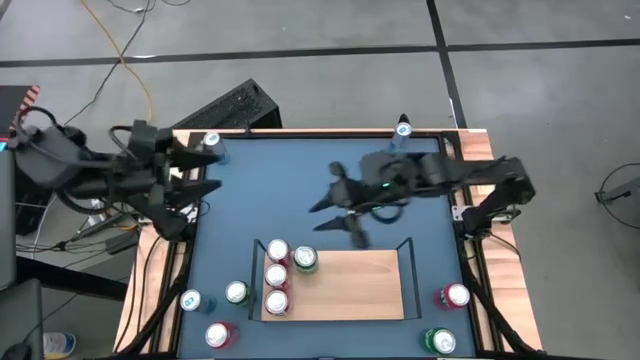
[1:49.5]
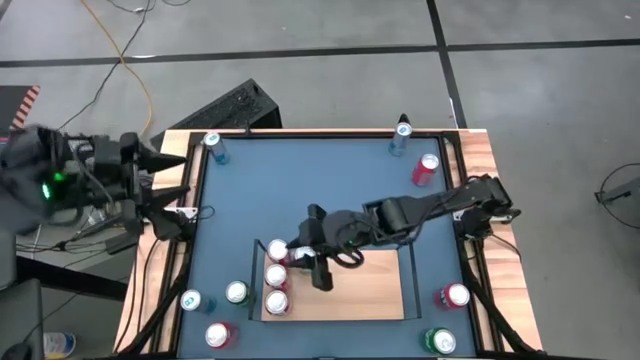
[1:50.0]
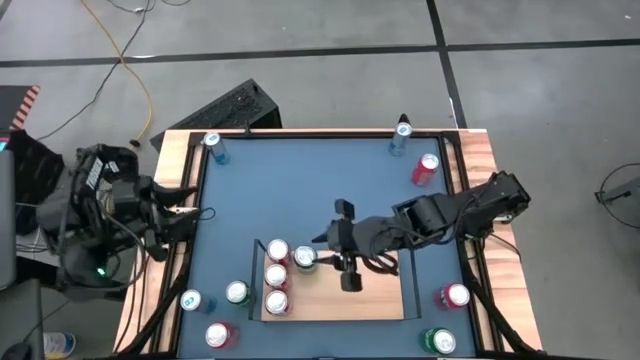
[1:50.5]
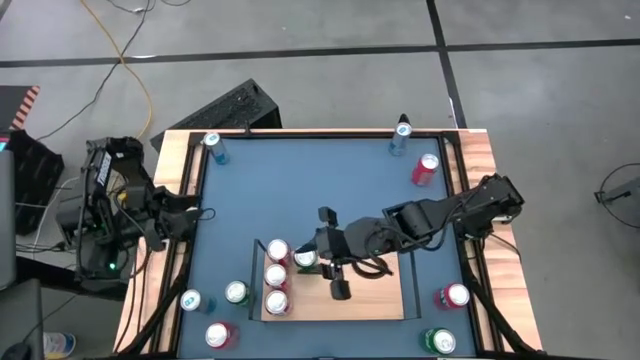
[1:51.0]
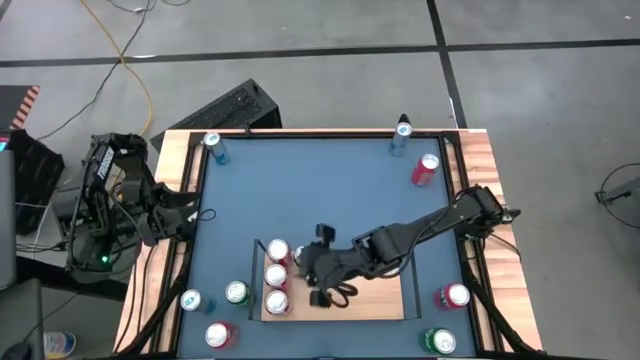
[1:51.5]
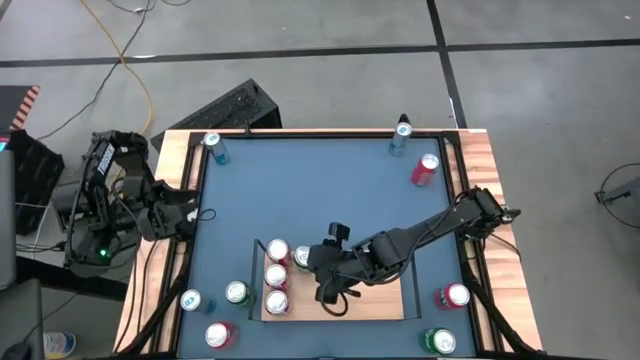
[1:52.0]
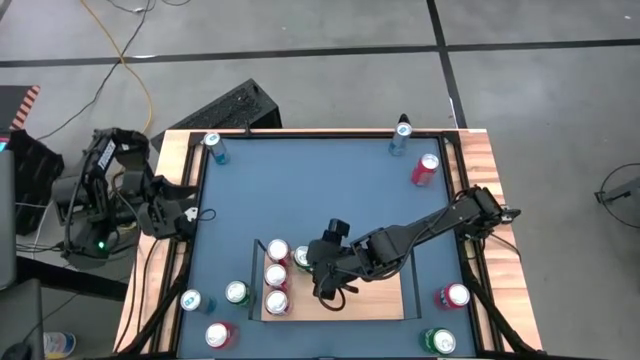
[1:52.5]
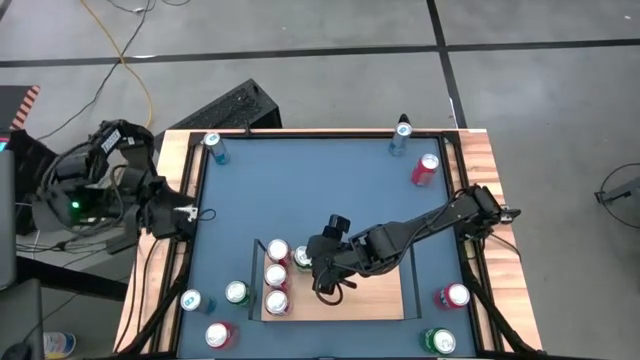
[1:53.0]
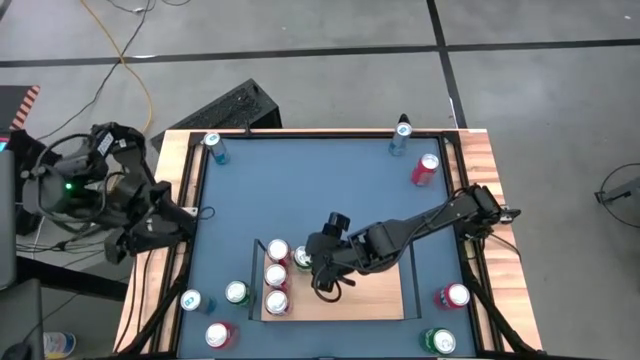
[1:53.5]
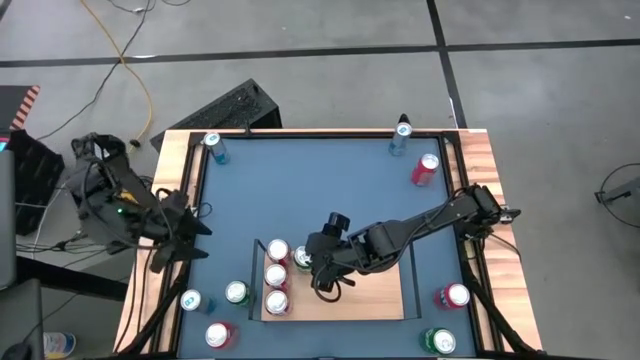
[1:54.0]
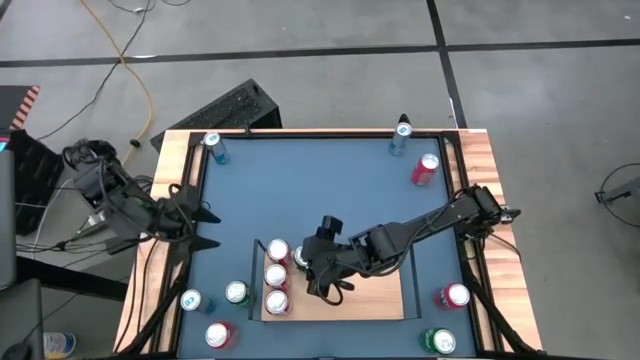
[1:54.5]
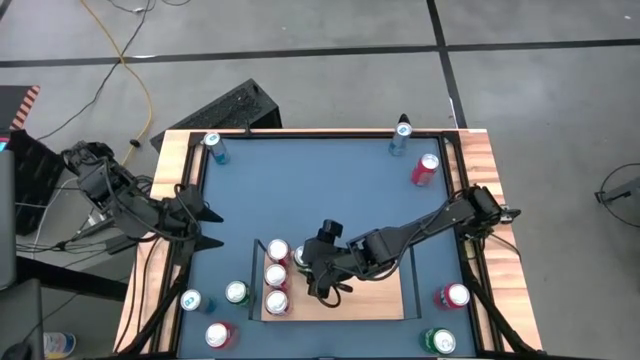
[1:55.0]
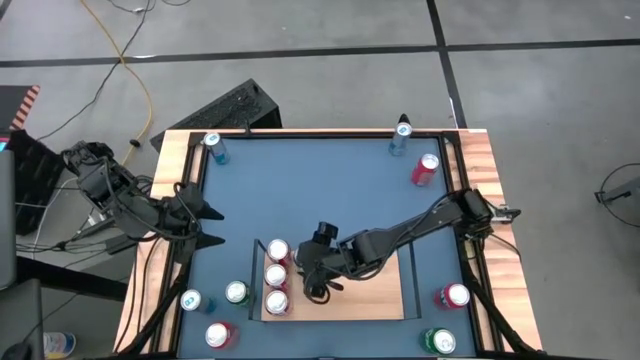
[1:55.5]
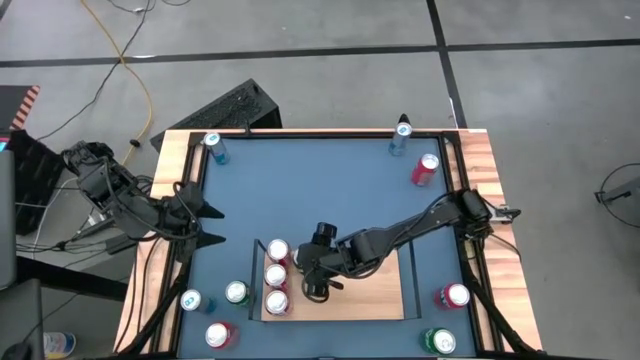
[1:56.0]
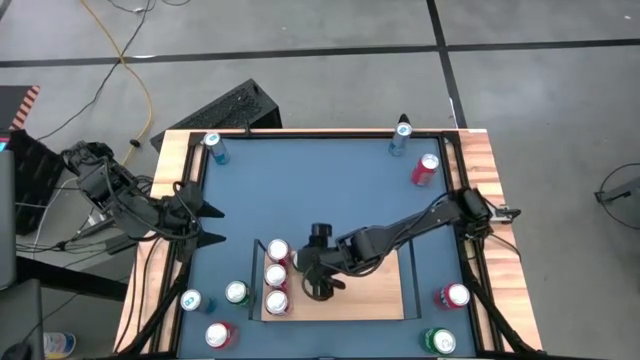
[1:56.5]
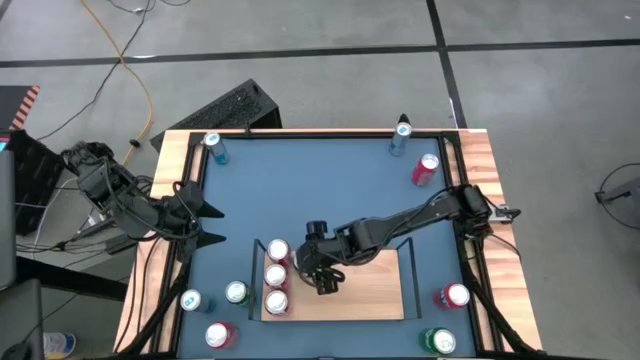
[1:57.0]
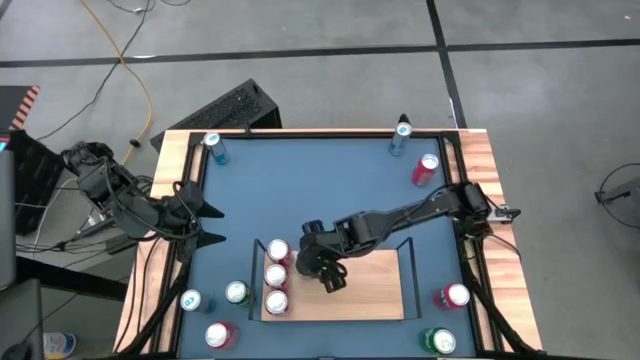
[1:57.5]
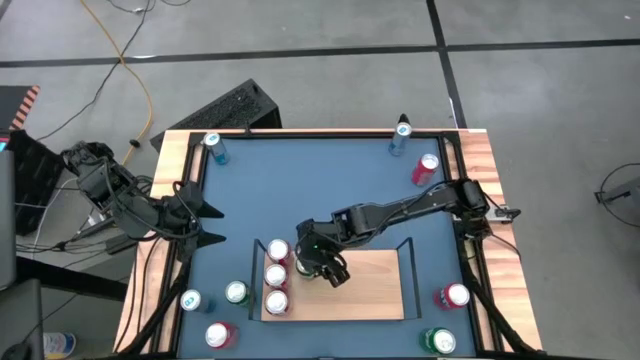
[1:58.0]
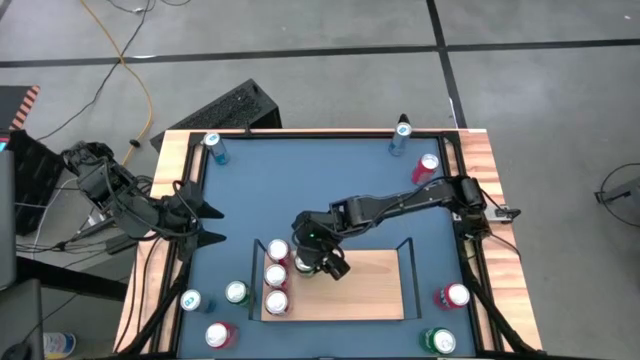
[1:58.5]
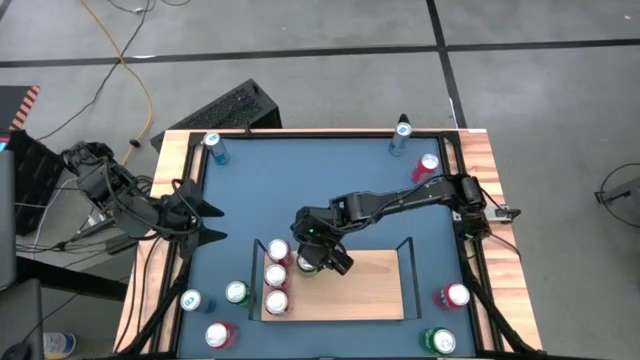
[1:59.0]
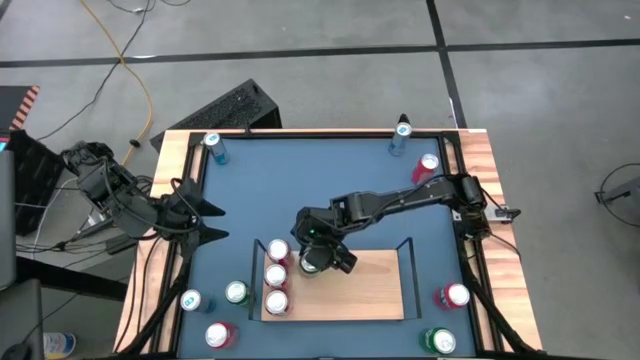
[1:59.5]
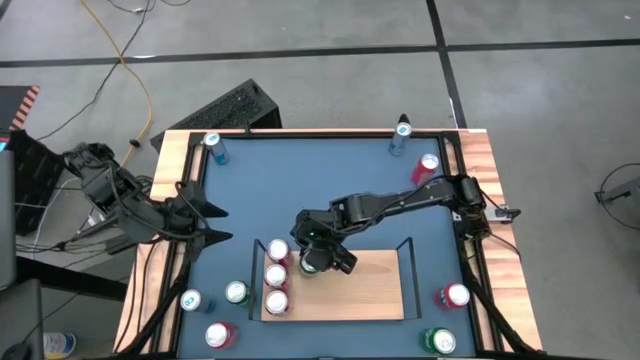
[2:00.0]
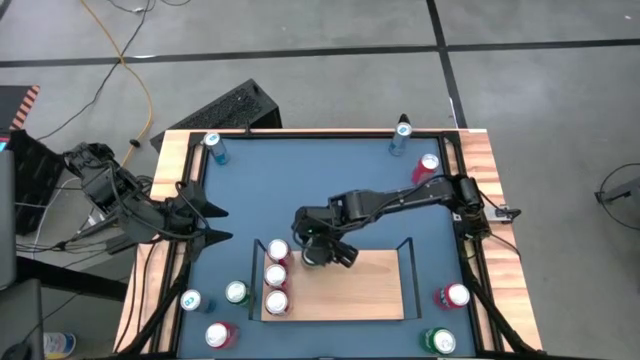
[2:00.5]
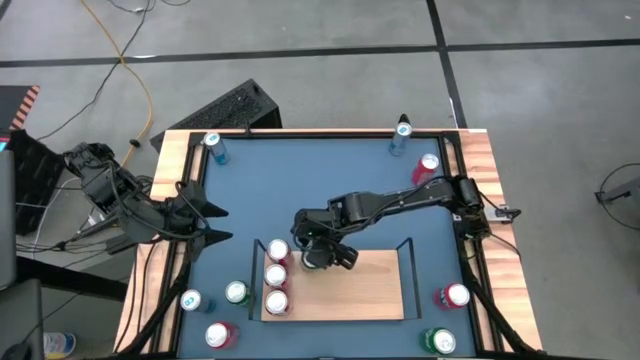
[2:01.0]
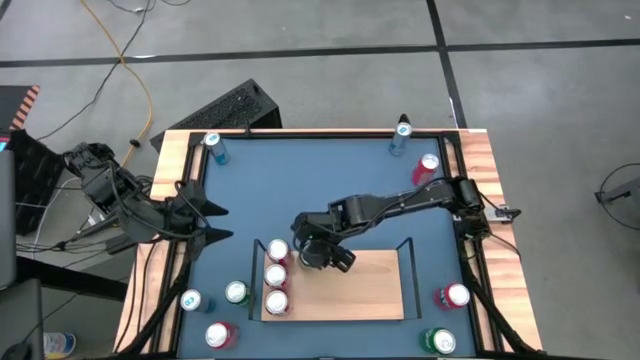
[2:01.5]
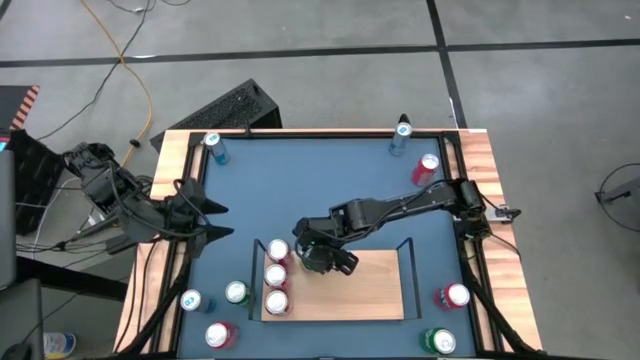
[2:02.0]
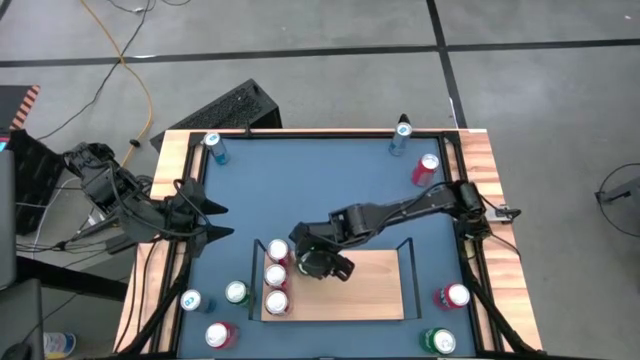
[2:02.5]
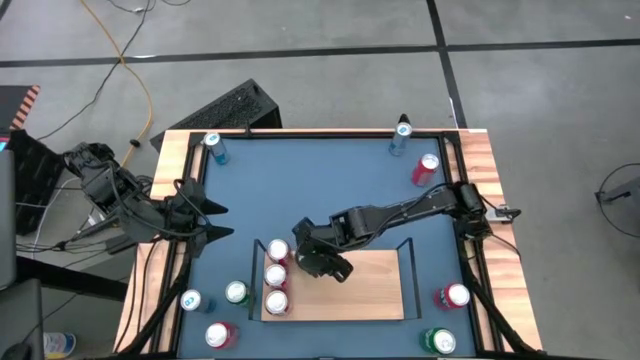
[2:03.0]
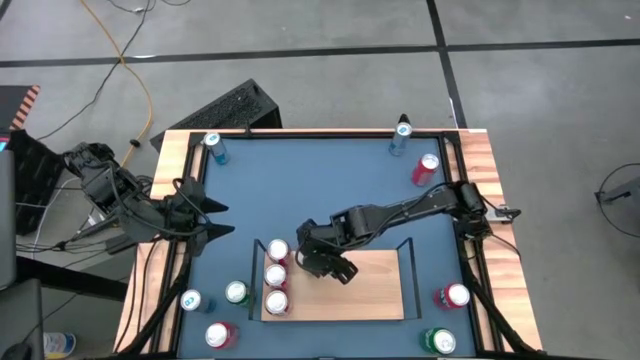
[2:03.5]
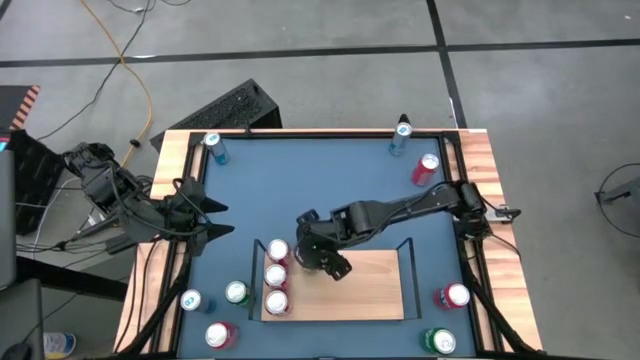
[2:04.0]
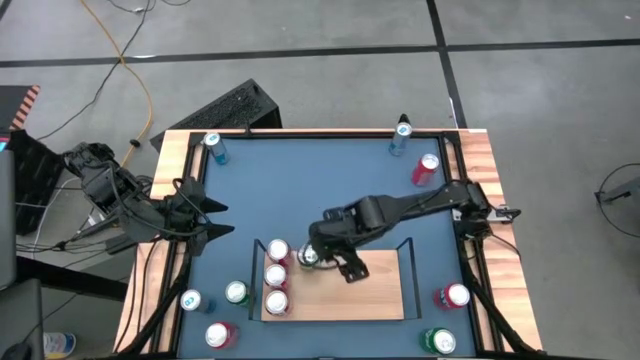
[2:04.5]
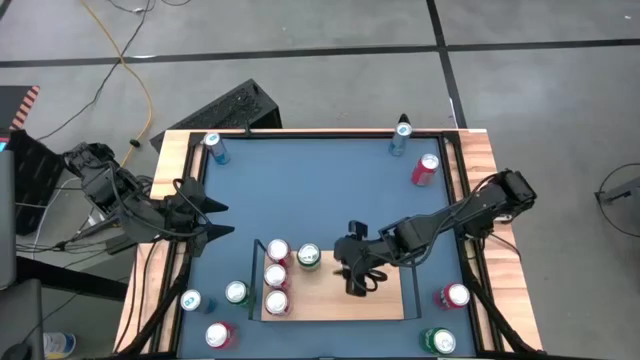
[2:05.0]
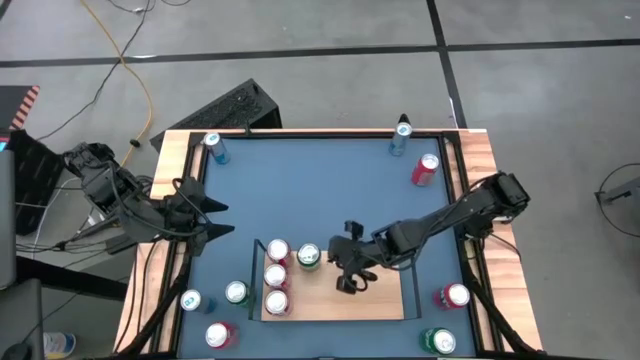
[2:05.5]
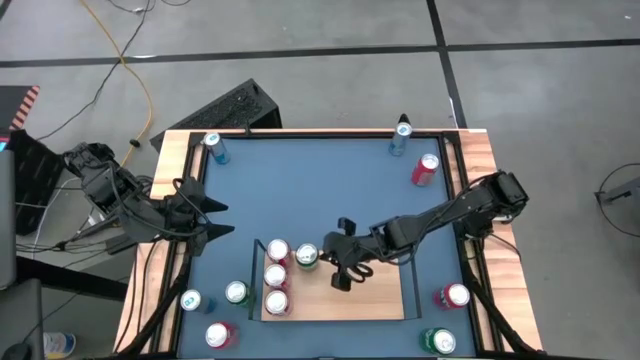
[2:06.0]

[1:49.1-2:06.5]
Task: Place canned beverage on shelf
Put the top left green soda can on the shelf aligned with the left red soda can

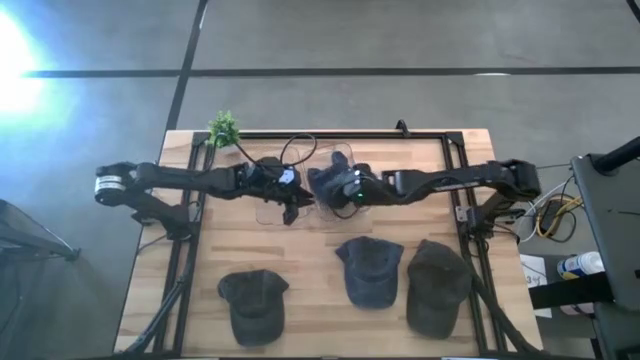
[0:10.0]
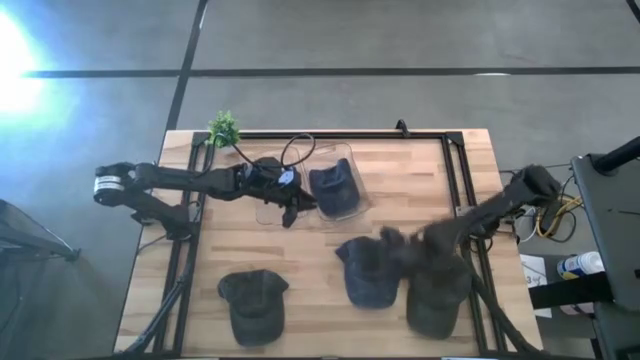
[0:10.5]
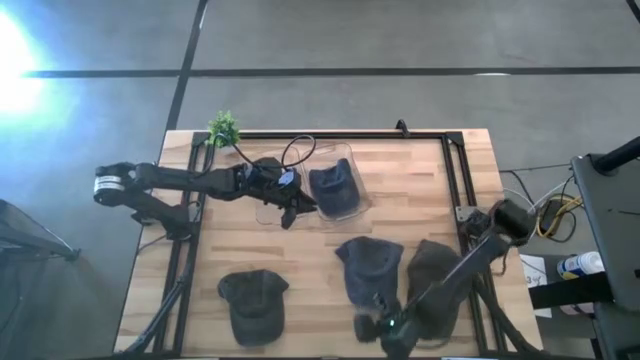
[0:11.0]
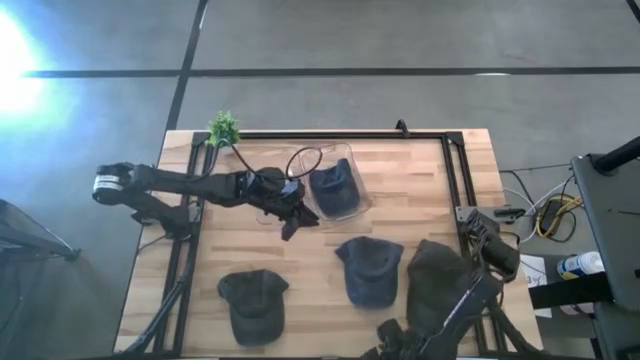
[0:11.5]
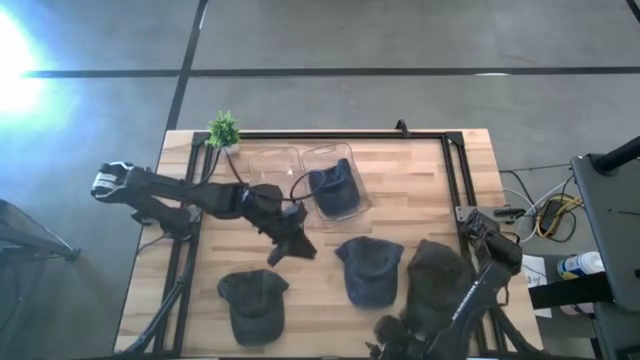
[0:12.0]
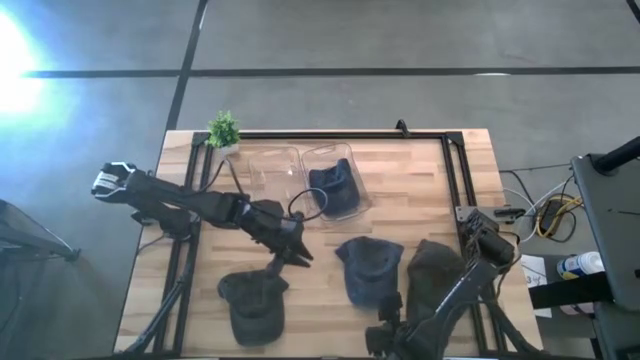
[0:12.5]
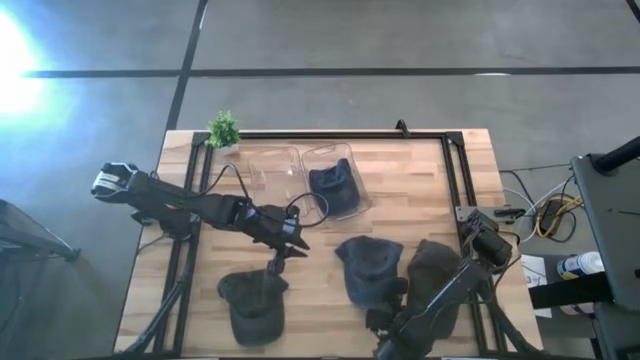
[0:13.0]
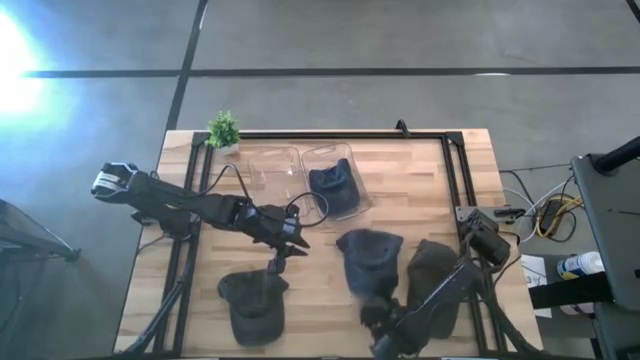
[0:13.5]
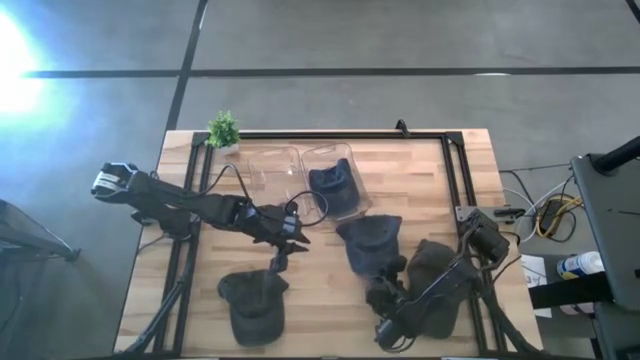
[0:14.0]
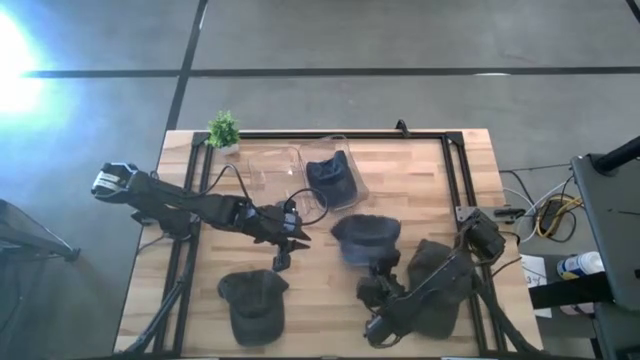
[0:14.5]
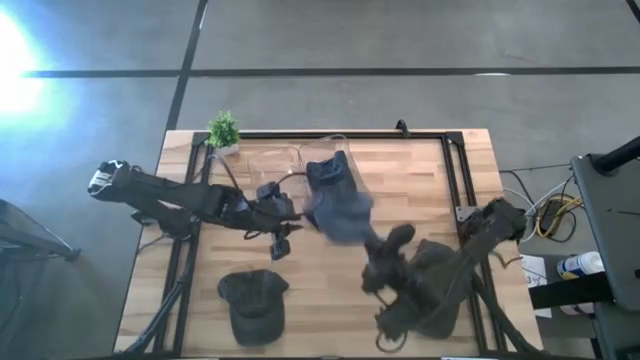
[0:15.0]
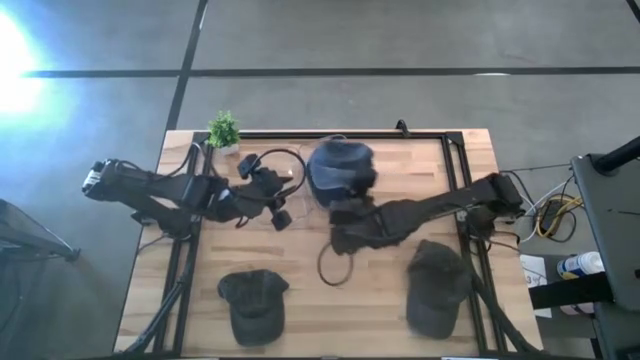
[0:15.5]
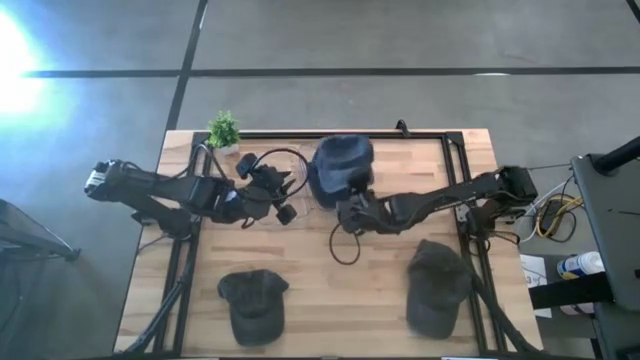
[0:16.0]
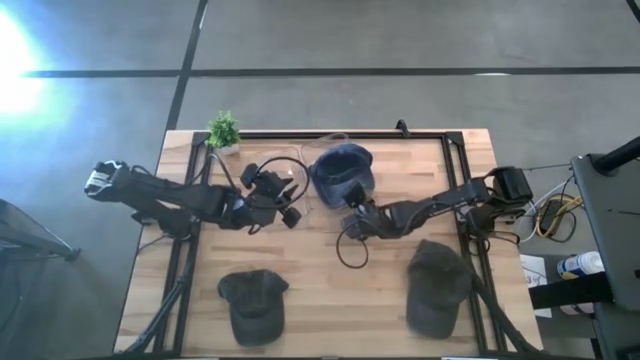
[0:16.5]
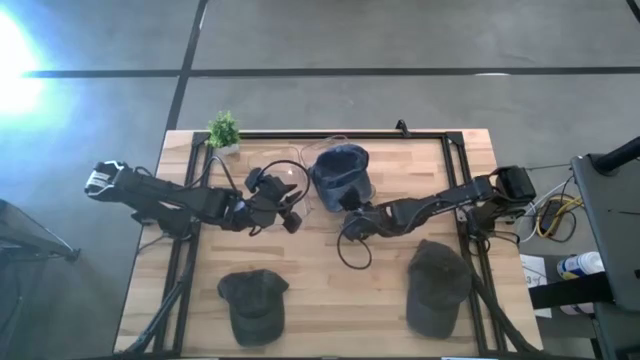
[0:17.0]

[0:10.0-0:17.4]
Task: Pick & Place hat
Put the blue cap into the right transparent bin
